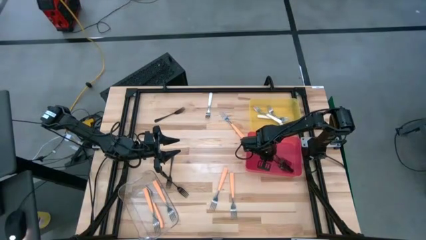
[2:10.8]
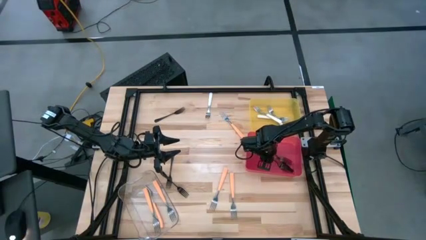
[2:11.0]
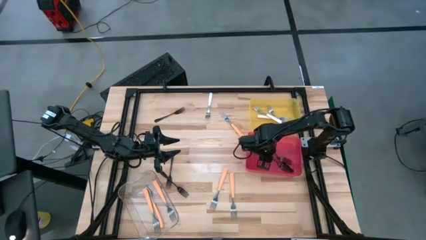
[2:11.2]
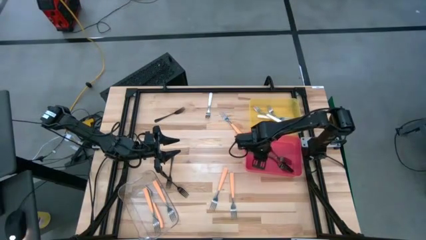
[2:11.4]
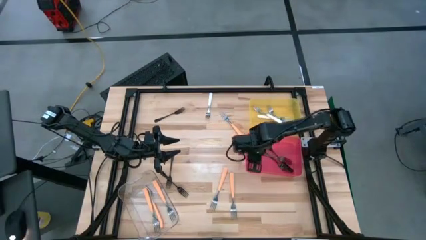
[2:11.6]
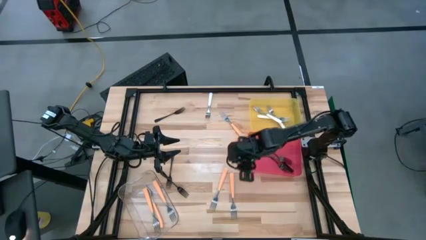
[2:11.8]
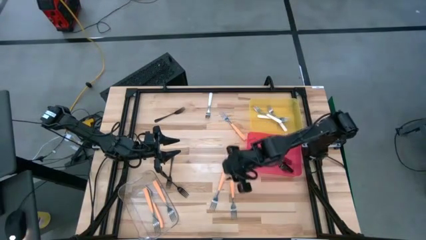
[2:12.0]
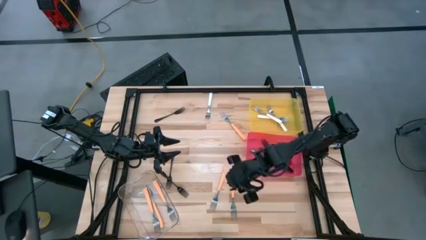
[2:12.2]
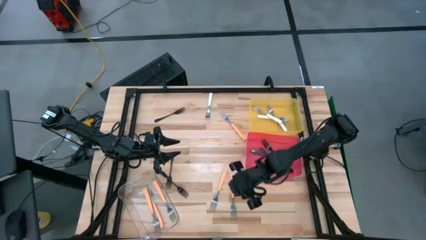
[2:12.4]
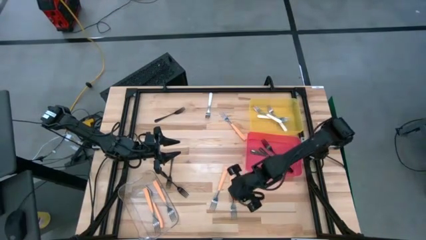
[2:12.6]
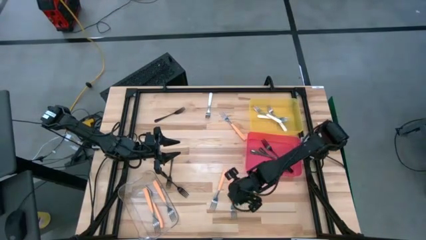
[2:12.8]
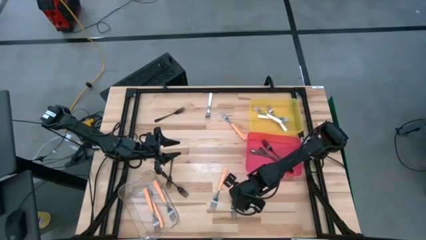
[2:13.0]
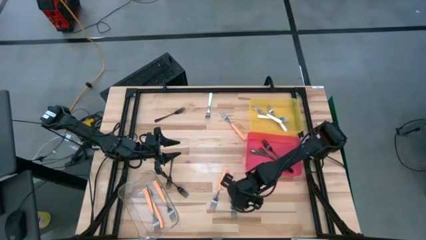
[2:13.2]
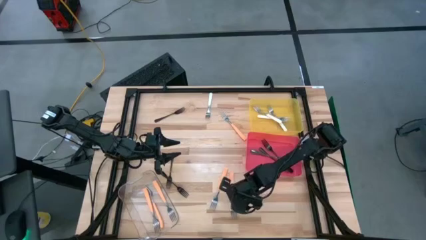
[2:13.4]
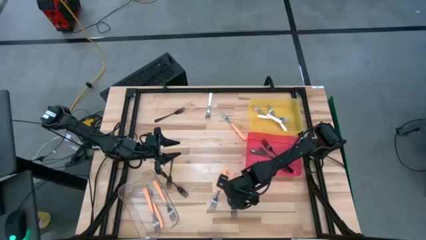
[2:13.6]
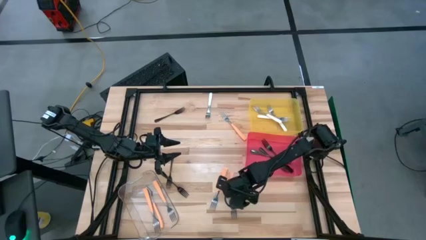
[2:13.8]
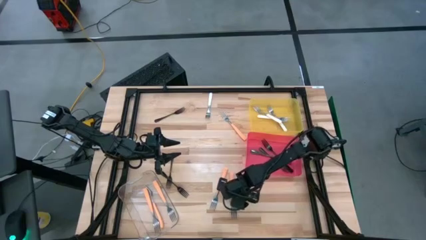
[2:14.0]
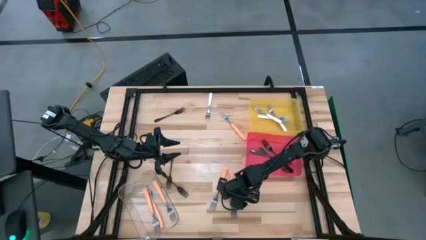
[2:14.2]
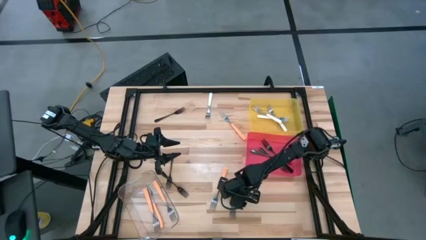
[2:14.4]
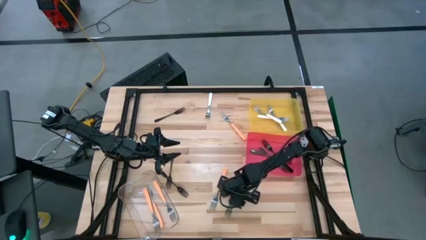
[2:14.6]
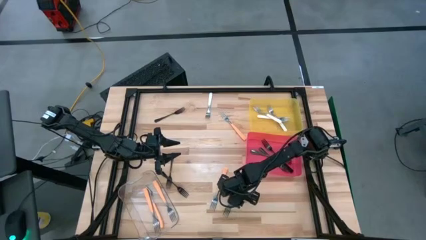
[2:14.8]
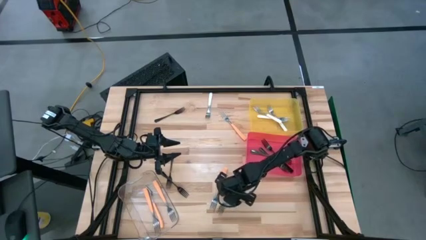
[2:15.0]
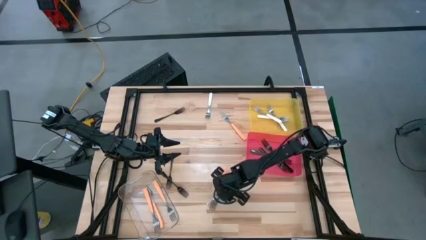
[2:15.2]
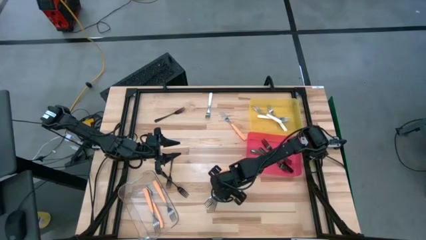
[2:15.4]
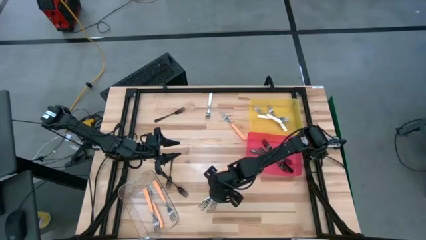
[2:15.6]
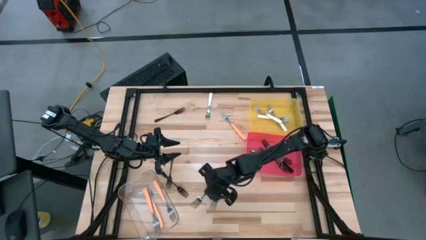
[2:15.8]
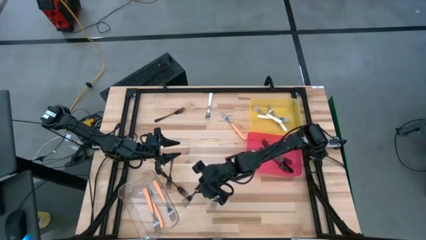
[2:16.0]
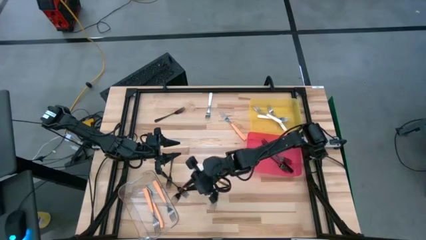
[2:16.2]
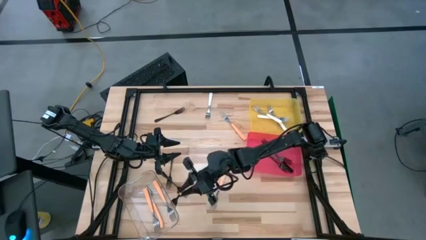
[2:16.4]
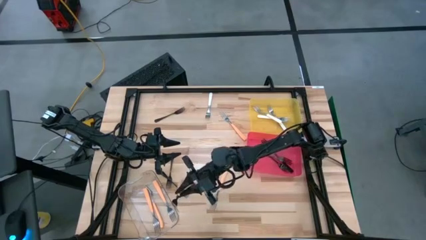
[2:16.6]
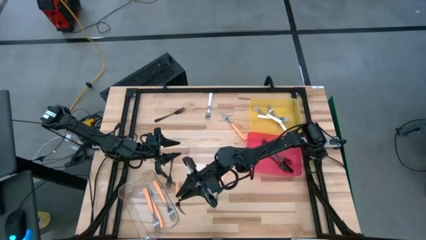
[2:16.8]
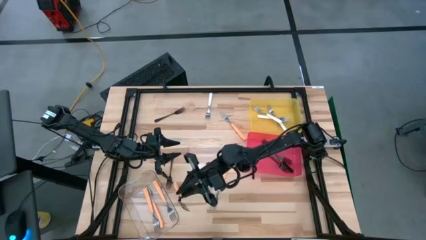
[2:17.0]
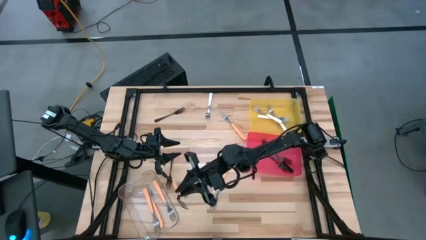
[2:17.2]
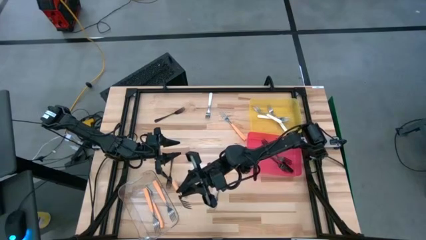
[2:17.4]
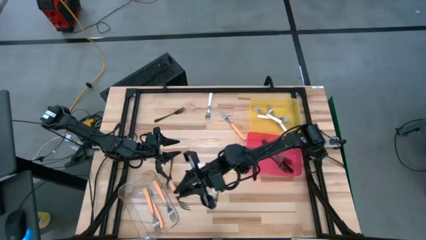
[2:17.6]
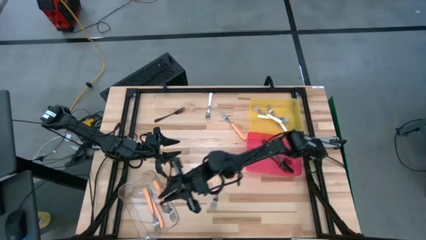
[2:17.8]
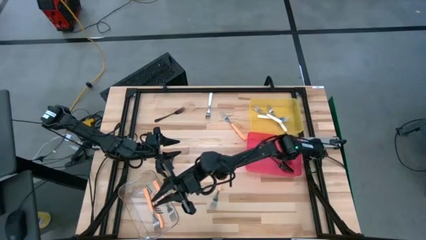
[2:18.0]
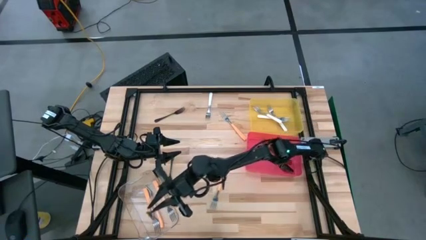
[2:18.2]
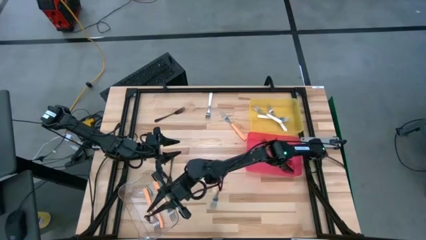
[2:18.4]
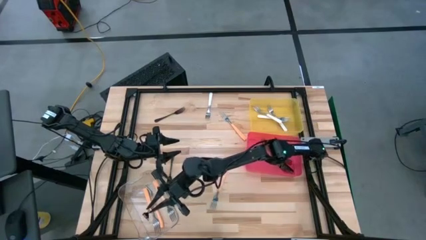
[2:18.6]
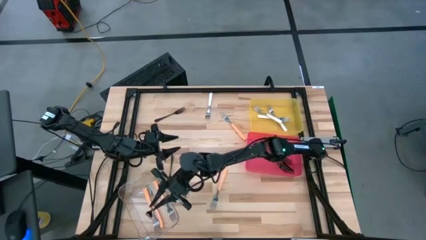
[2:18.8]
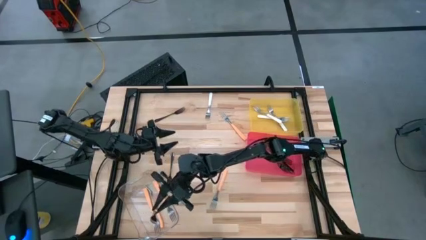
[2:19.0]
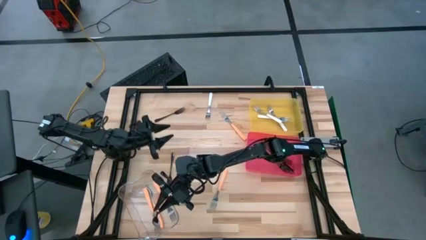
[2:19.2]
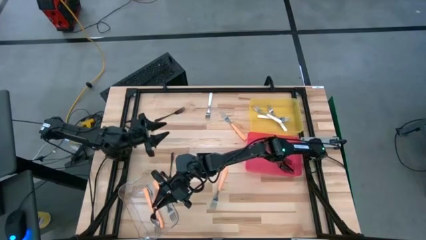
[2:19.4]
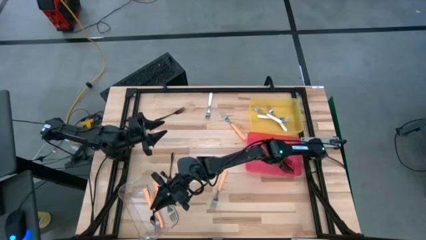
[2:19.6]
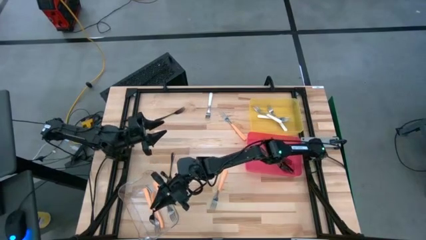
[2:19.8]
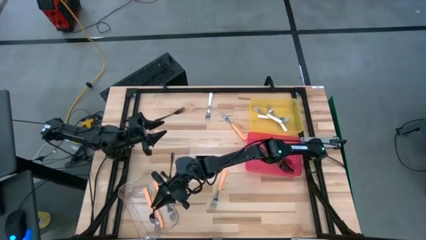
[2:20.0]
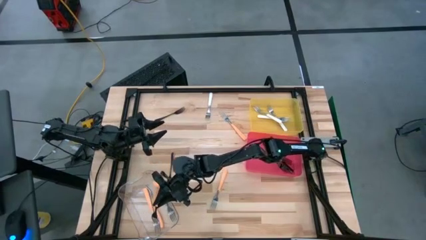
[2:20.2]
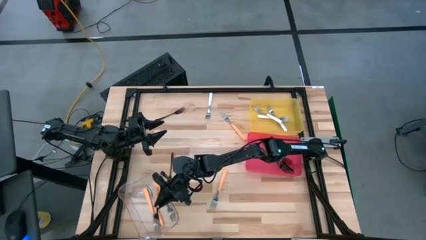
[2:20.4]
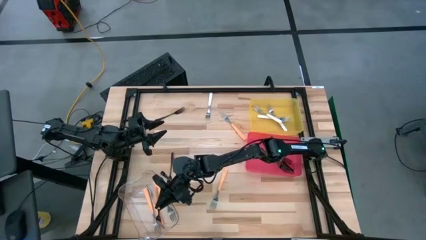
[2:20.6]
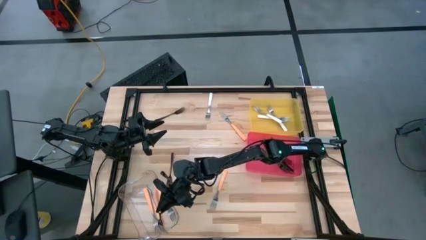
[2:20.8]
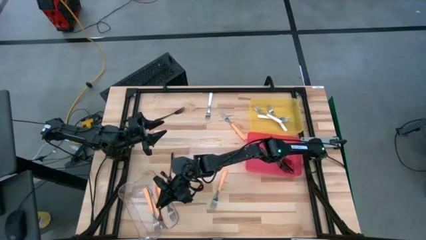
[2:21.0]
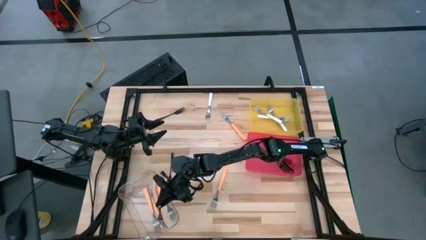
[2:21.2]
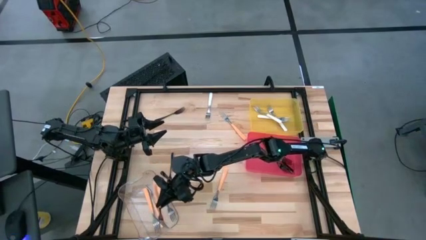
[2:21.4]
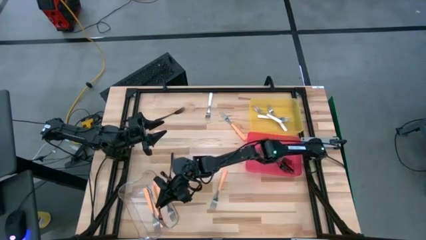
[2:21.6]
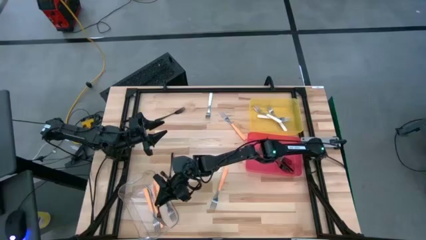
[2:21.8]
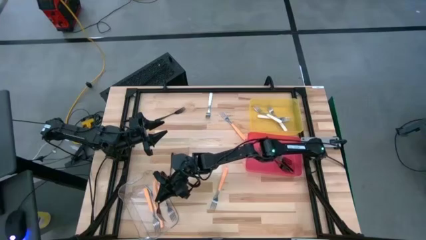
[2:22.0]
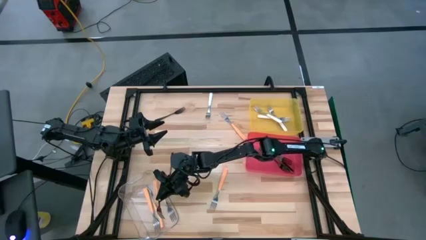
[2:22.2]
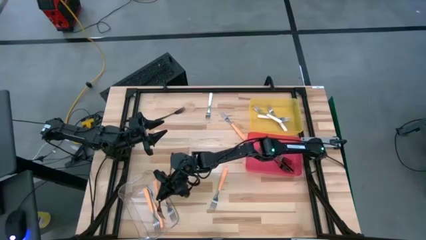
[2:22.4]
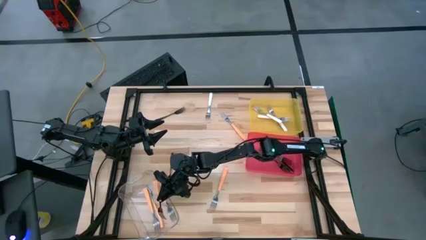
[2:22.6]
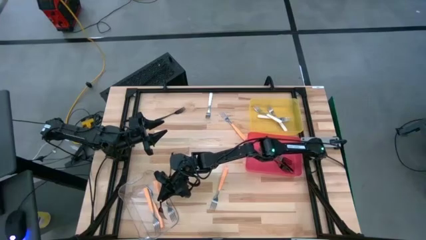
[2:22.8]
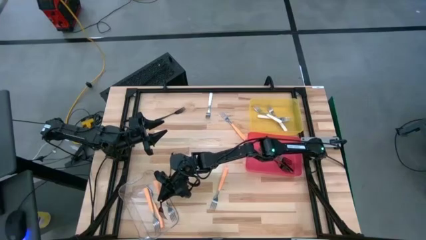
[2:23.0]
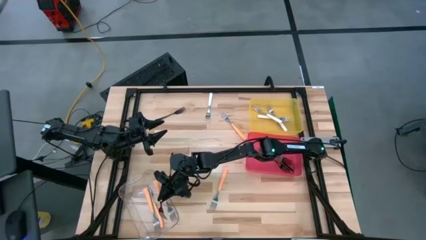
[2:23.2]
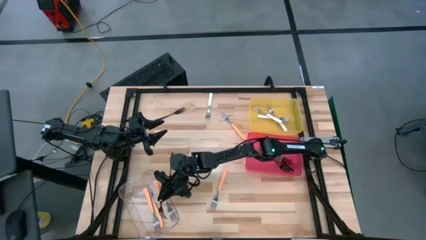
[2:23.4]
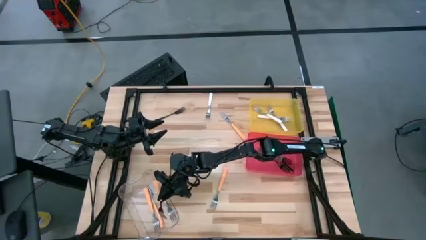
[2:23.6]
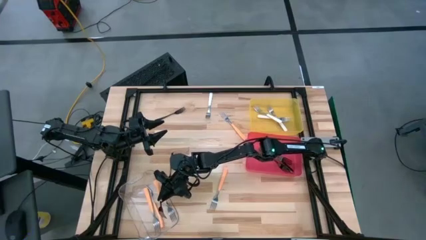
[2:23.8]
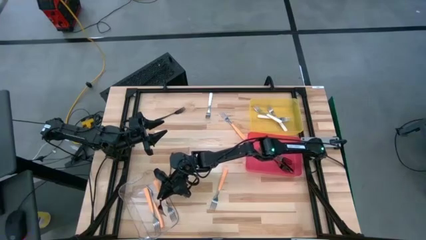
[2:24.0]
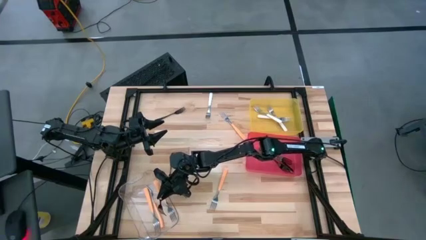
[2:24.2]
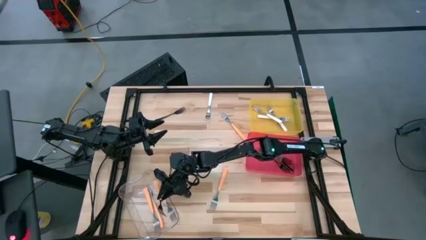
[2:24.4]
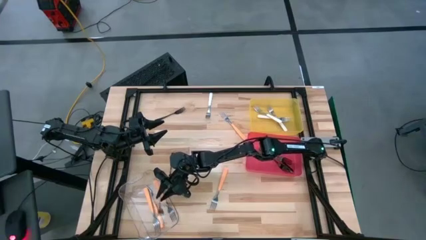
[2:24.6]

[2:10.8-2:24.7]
Task: Sort silverware by color (type)
Put the orange fork into the transparent bin

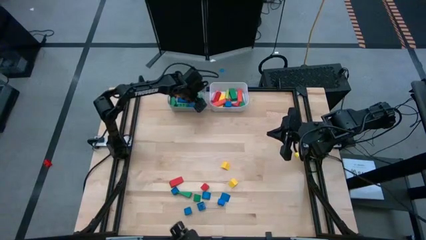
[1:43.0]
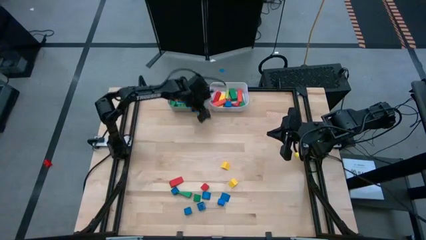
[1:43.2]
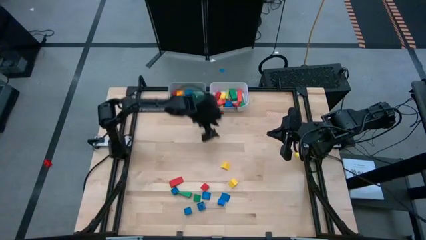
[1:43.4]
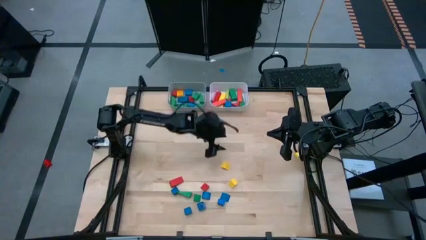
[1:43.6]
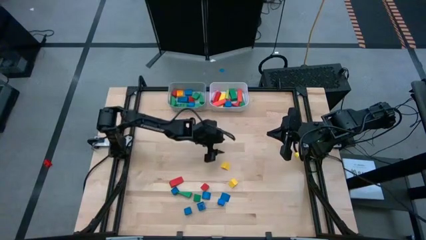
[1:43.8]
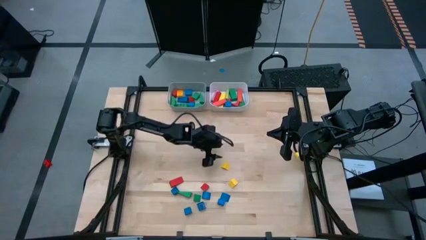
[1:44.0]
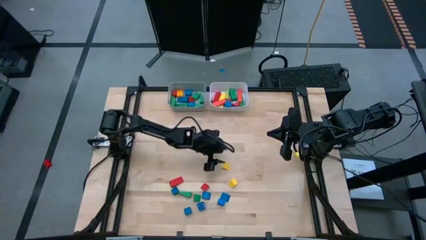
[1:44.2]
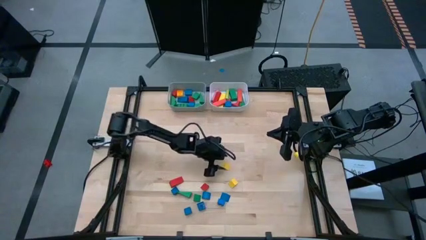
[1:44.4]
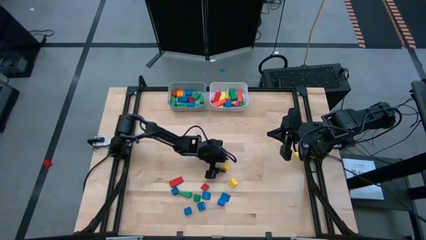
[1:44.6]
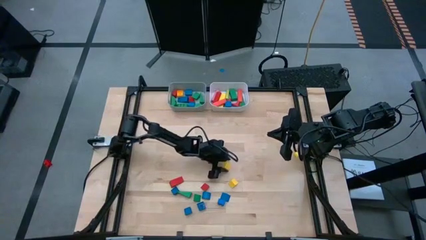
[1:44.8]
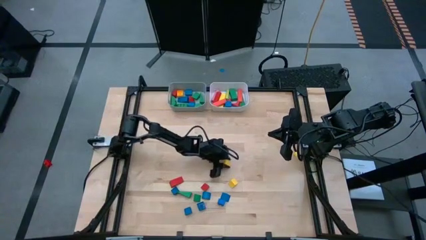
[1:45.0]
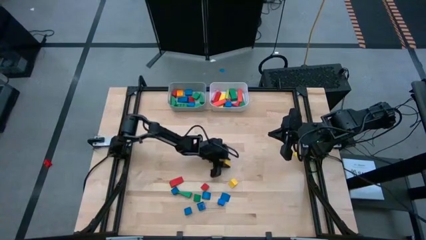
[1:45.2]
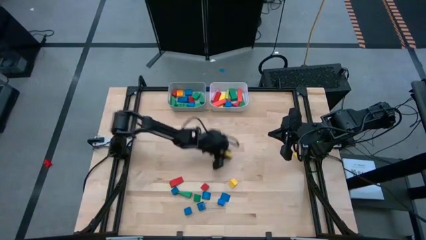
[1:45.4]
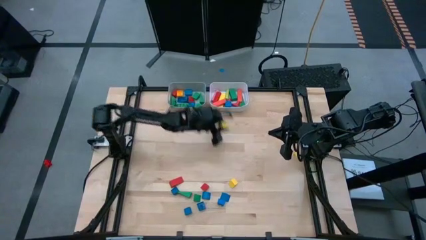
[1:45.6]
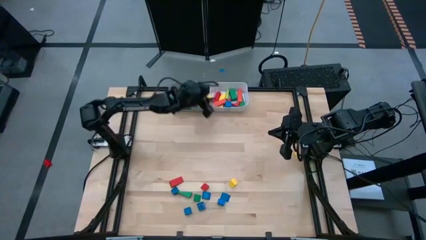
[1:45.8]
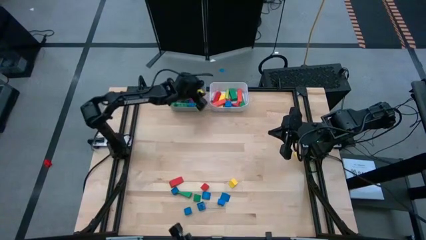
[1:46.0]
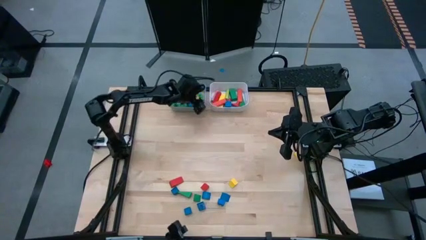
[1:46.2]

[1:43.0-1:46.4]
Task: Sort blocks by size
Put the yellow triangular block into the gray bin
